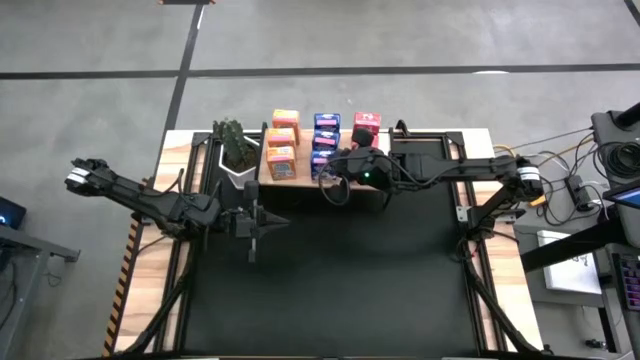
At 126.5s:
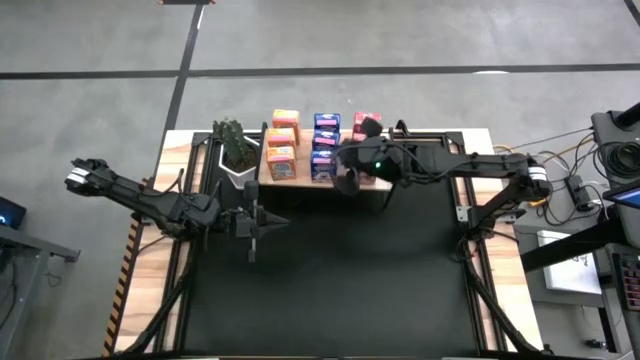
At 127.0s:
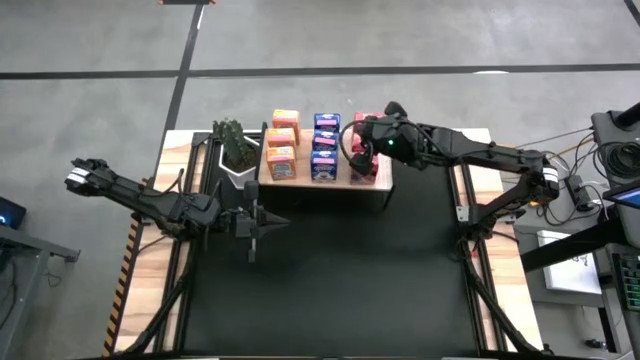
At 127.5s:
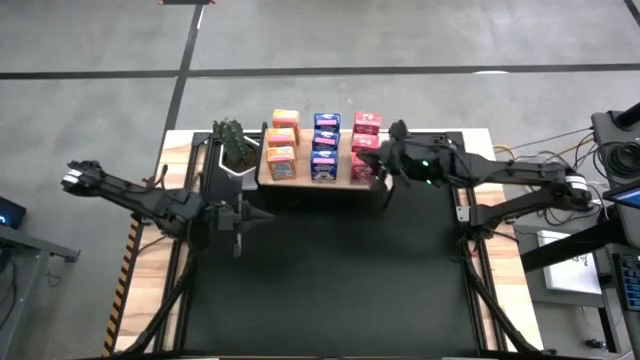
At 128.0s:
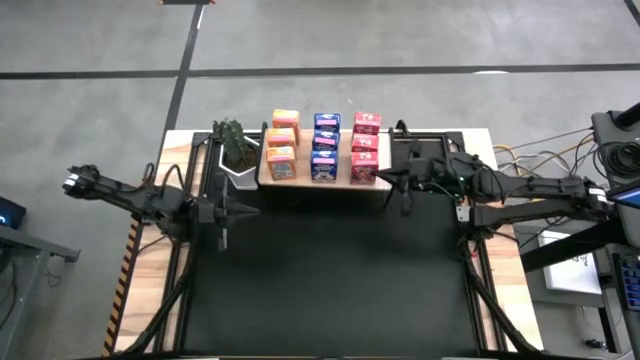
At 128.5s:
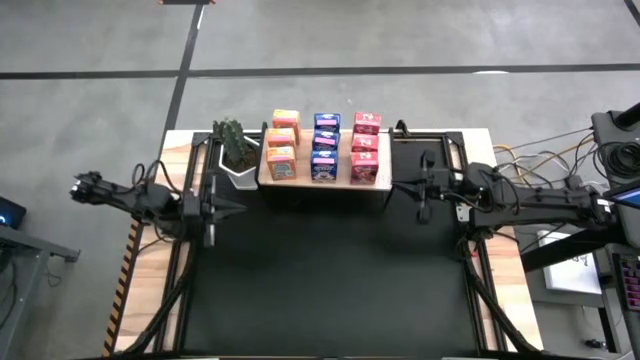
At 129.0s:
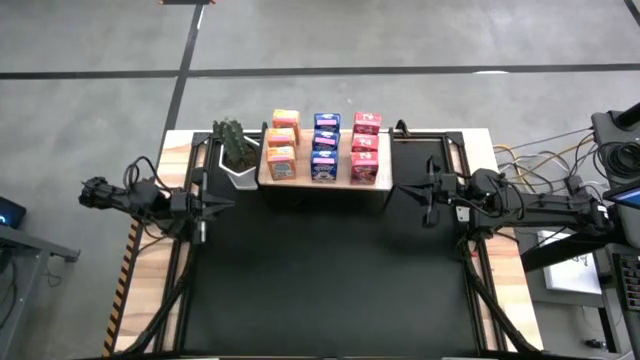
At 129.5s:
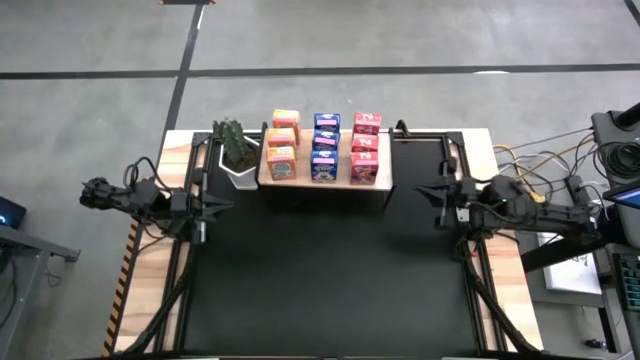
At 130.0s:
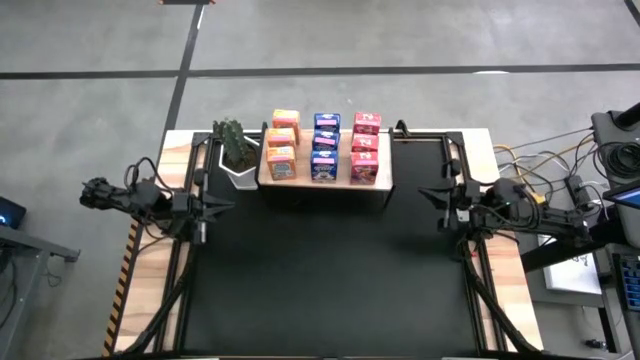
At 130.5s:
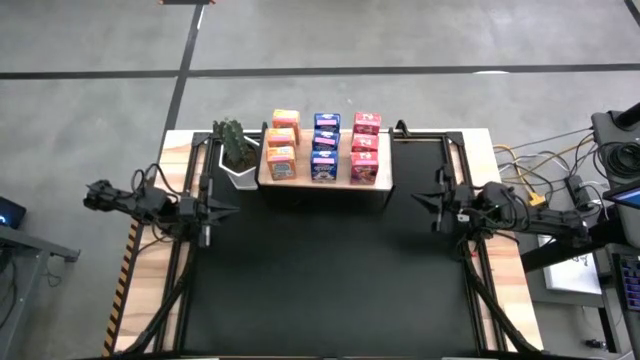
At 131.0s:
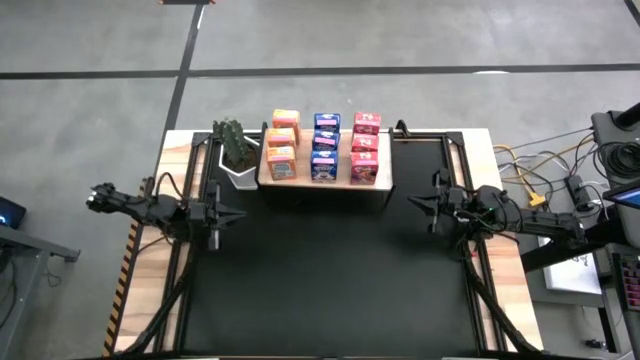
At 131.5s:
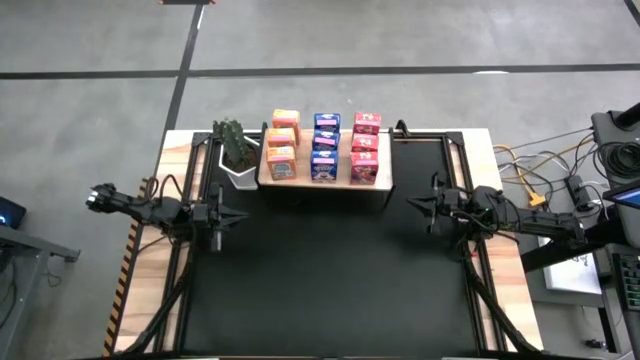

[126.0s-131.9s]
Task: Stack cereal on shelf
Return to Home Position

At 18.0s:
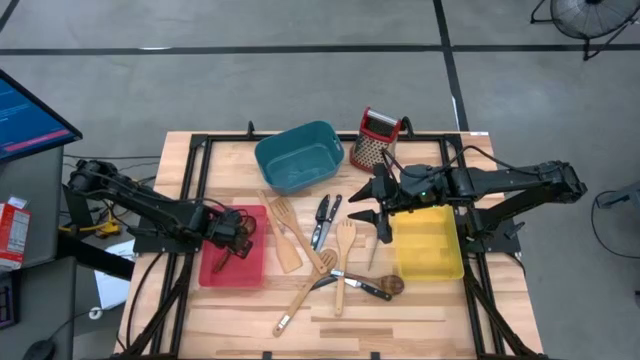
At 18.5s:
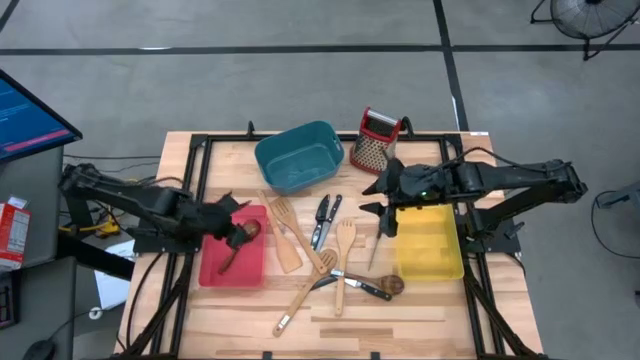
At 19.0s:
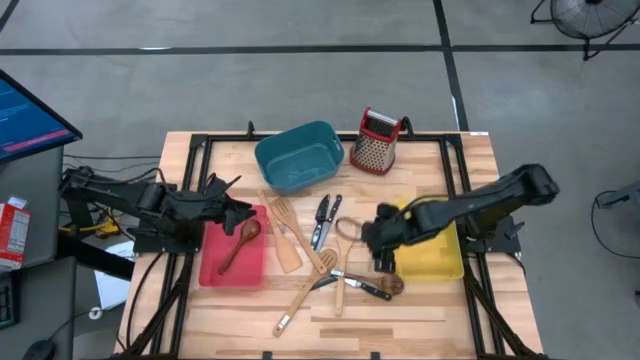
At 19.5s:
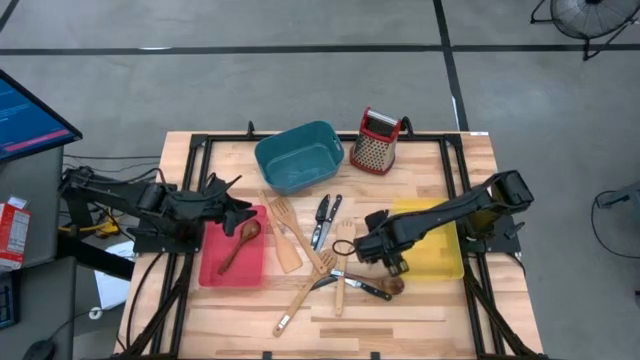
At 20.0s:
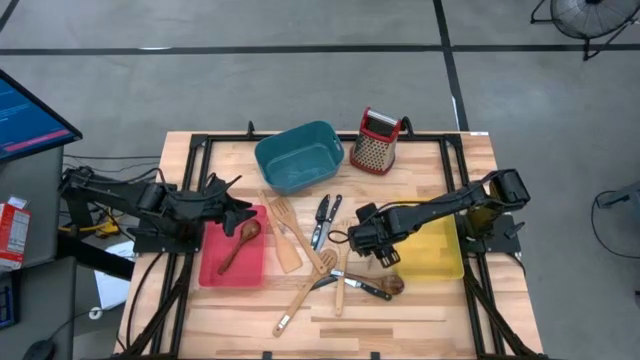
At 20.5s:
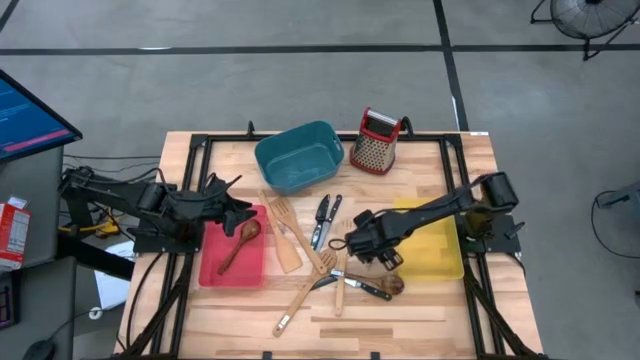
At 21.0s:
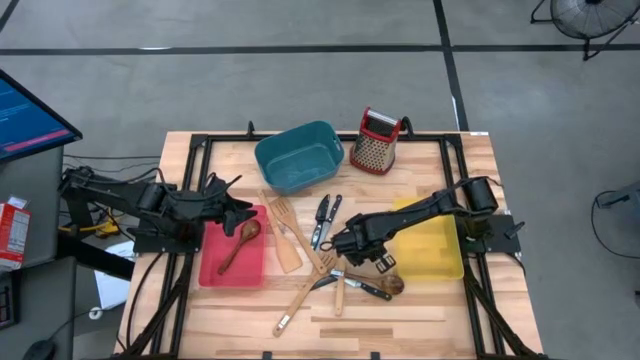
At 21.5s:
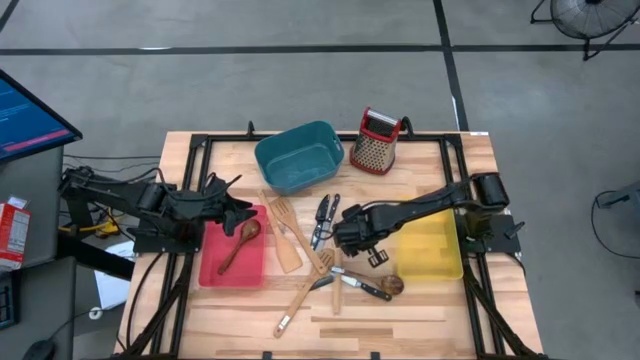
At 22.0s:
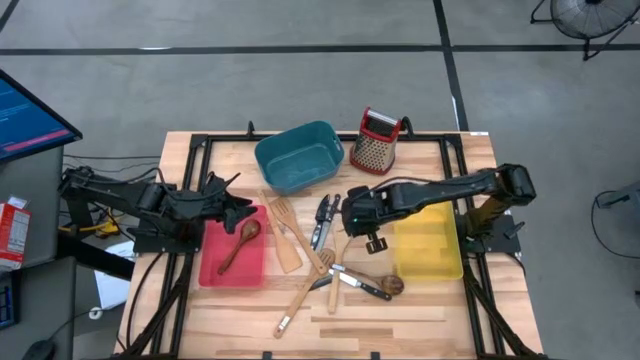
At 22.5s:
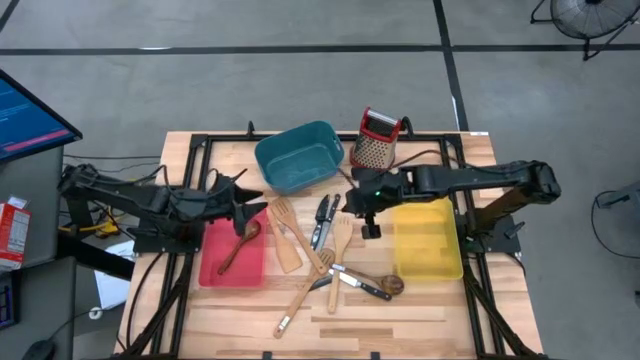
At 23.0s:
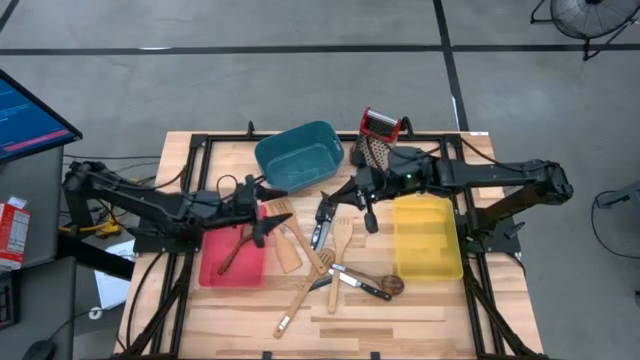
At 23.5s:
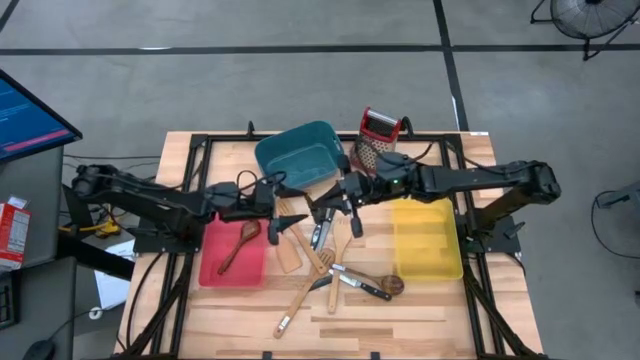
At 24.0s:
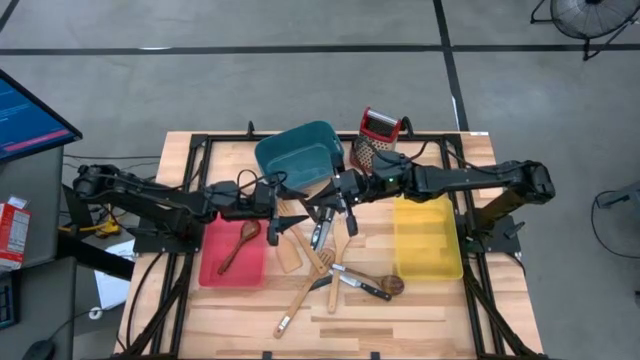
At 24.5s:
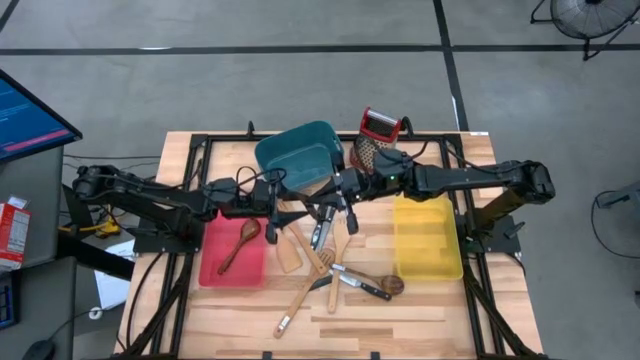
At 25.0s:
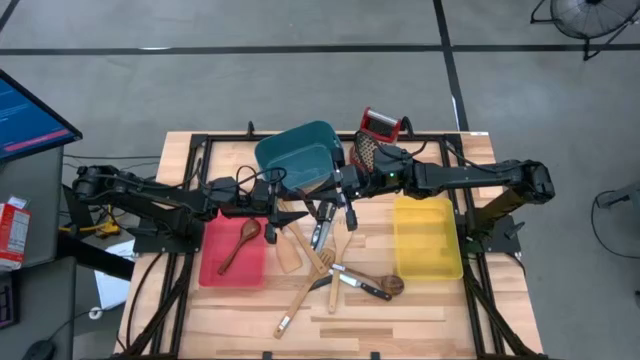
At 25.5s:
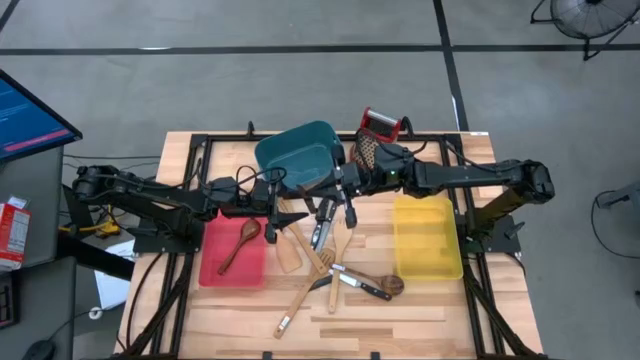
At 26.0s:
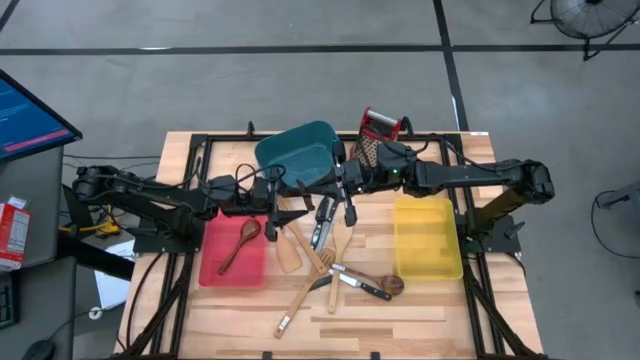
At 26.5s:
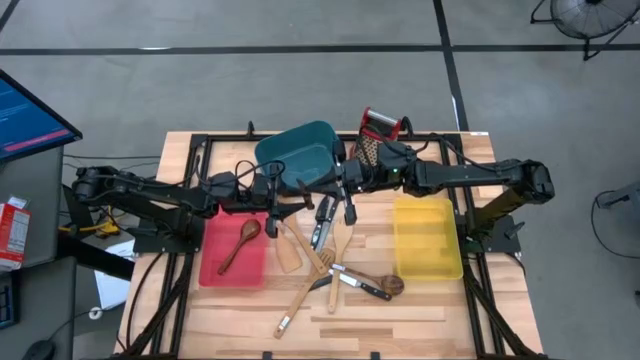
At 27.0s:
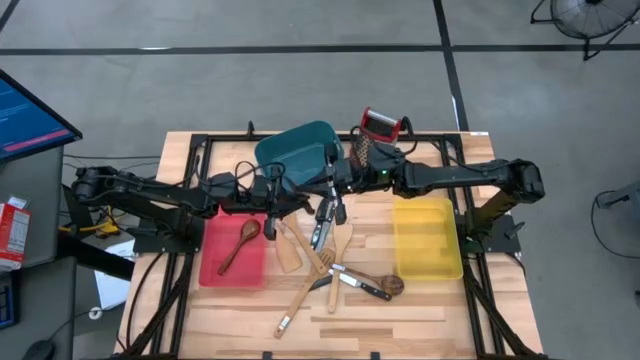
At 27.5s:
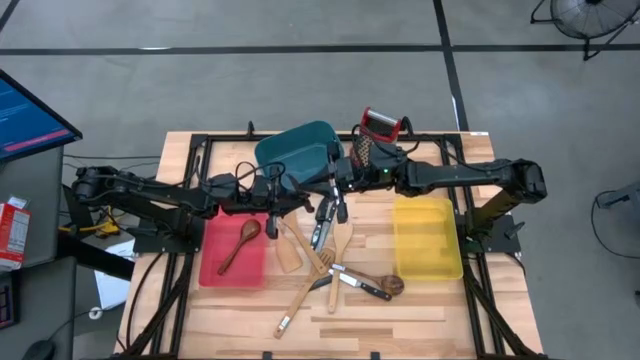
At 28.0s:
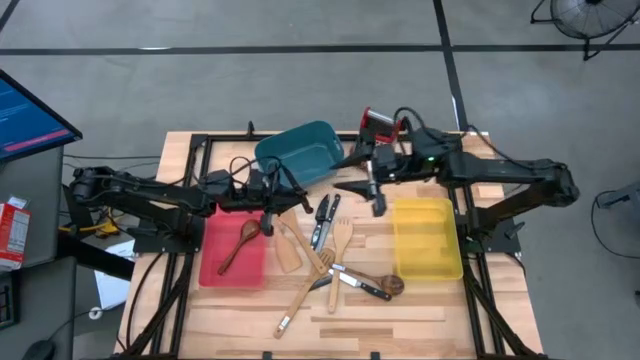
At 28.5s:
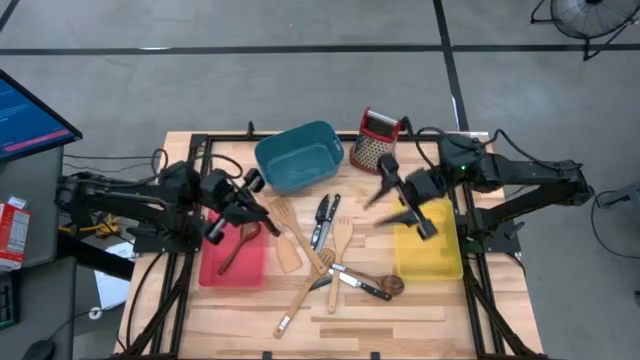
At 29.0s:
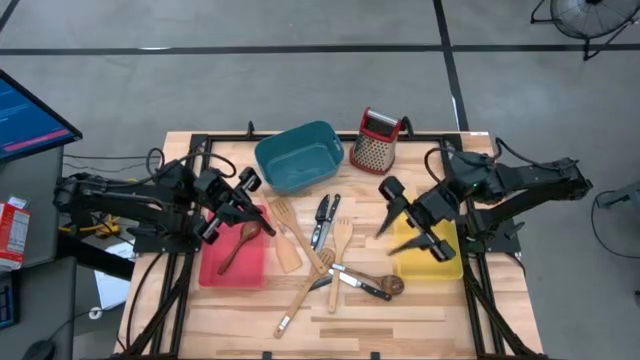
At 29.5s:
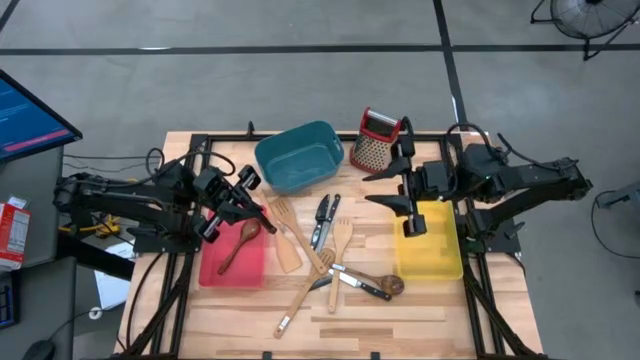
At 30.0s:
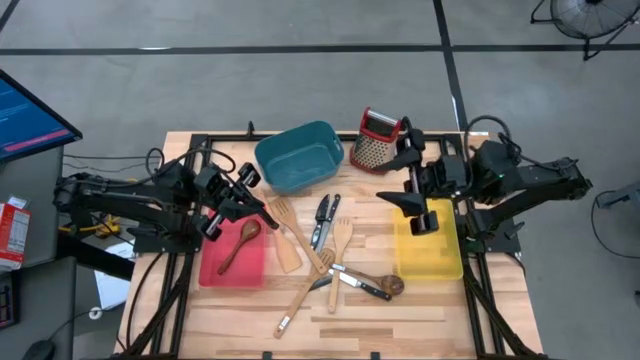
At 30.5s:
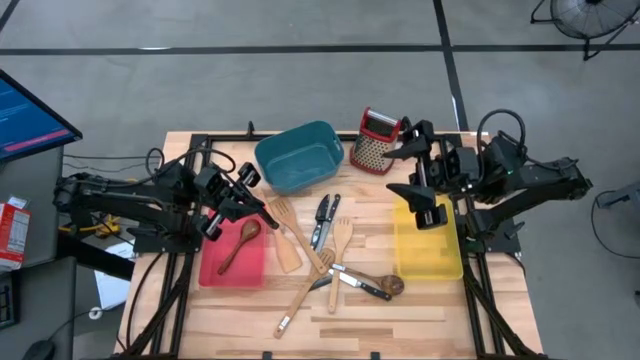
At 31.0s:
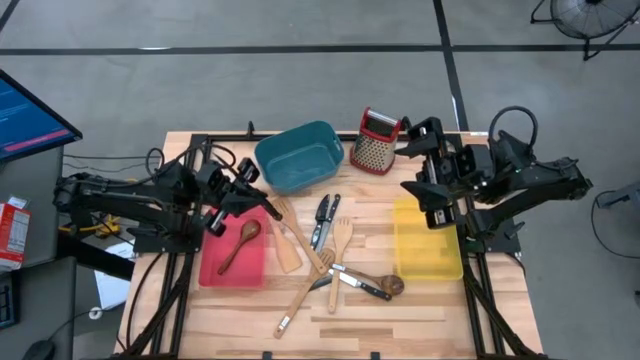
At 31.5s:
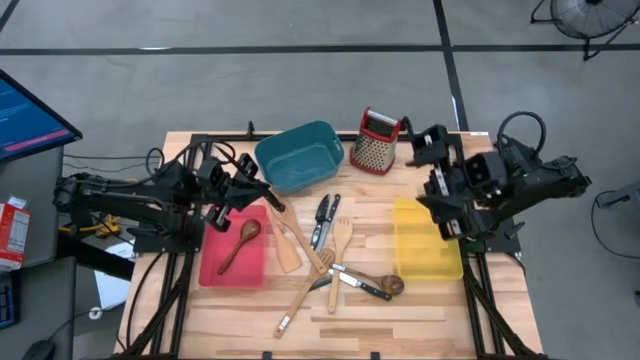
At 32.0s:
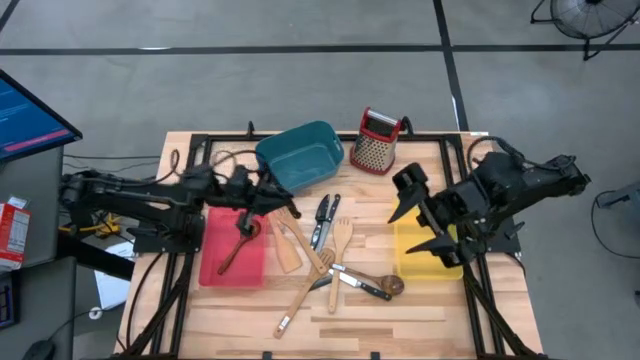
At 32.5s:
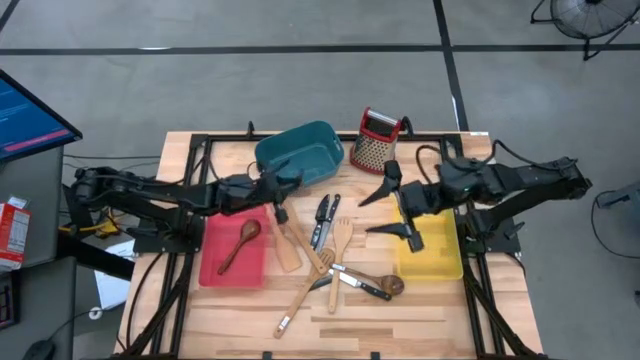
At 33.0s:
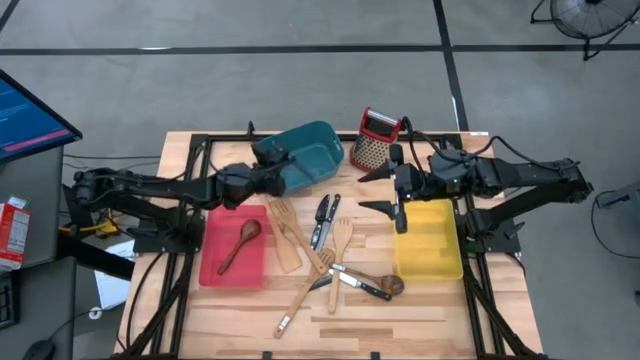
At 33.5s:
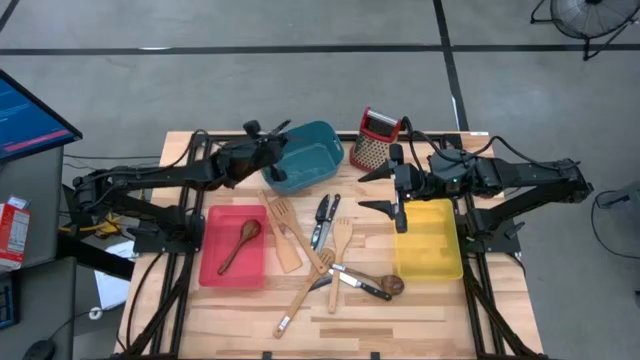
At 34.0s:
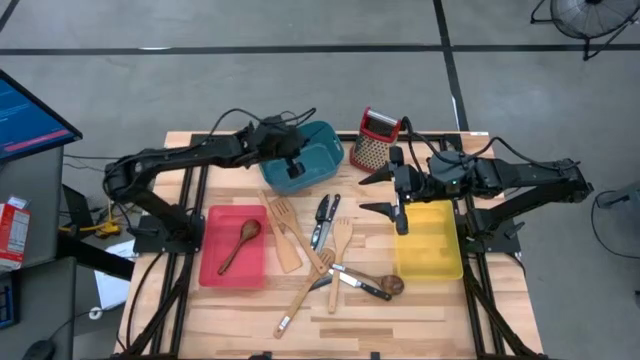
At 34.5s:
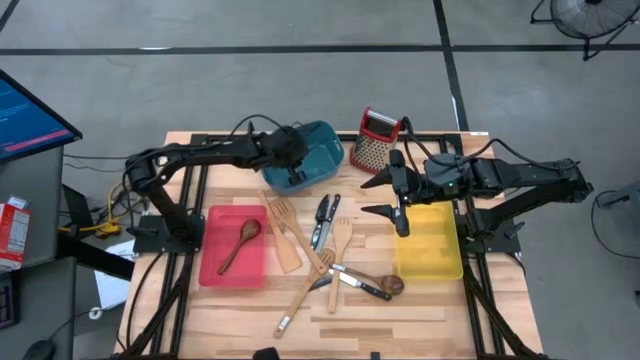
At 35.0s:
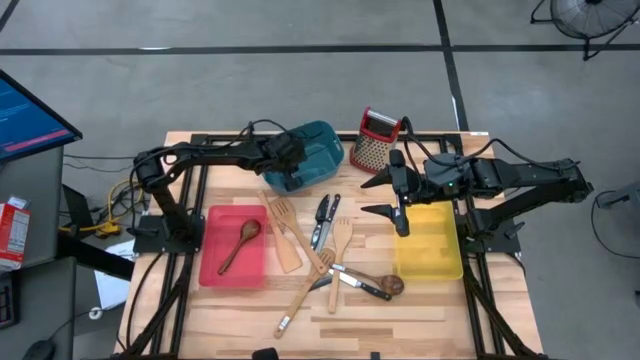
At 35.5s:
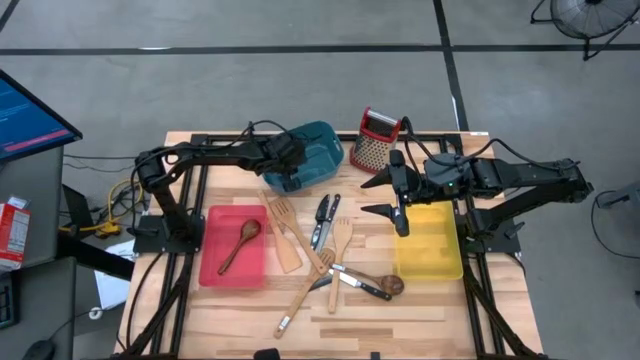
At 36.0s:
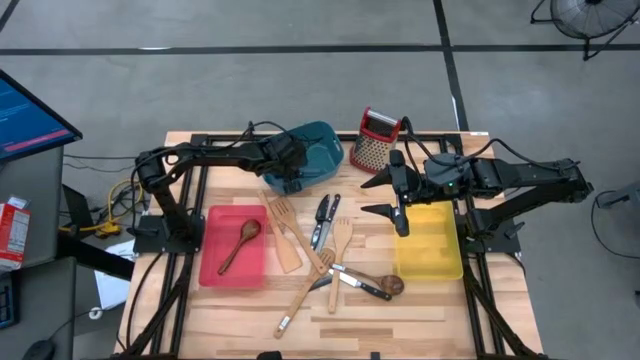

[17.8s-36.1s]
Task: Pick & Place Kitchen Items
Put the black table knife into the blue bin
